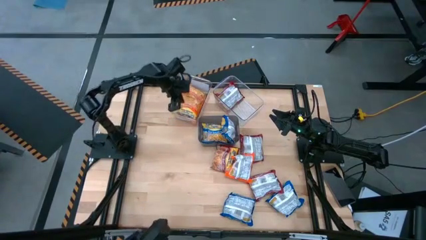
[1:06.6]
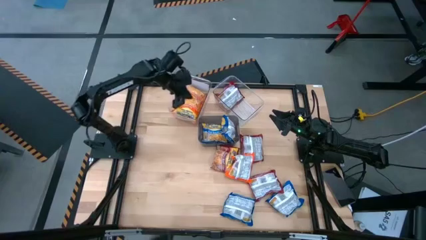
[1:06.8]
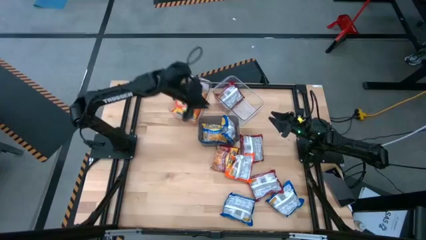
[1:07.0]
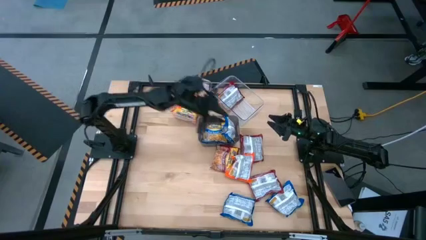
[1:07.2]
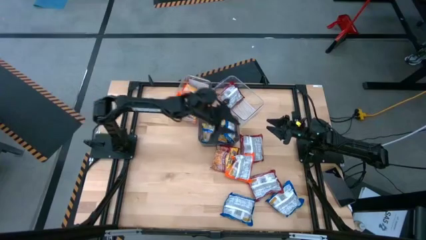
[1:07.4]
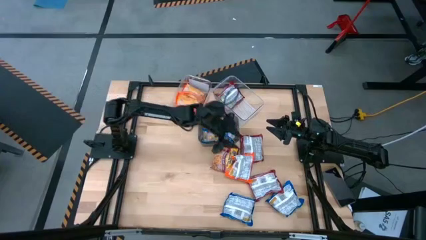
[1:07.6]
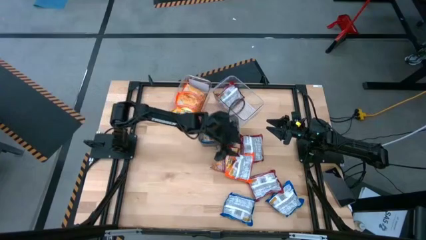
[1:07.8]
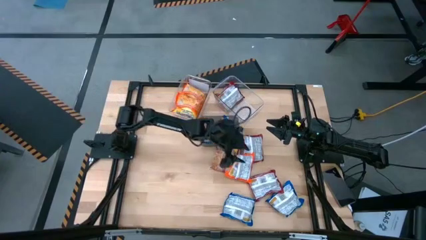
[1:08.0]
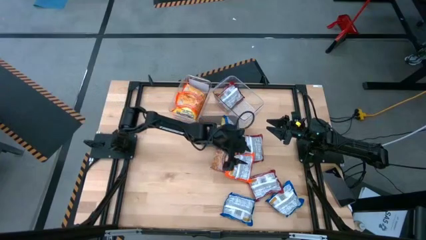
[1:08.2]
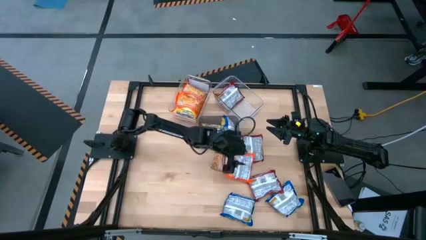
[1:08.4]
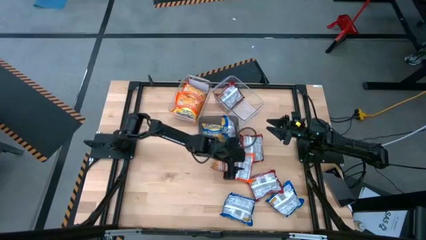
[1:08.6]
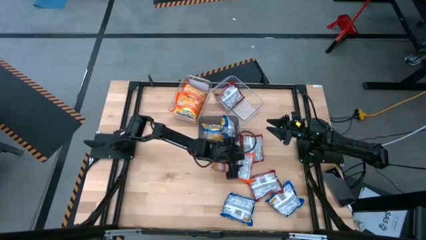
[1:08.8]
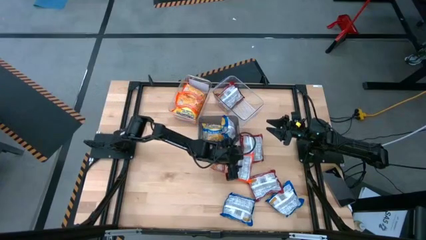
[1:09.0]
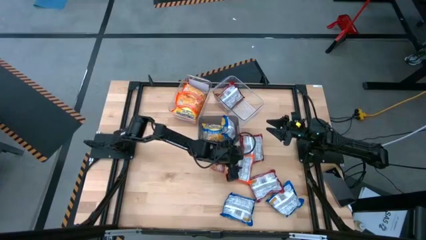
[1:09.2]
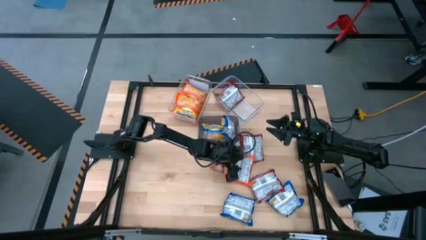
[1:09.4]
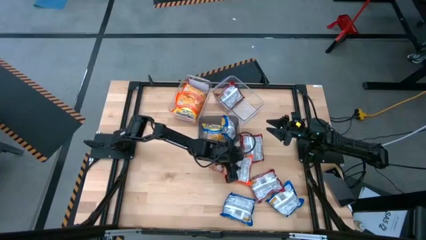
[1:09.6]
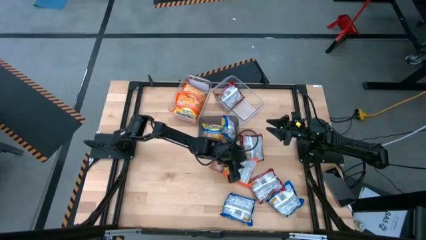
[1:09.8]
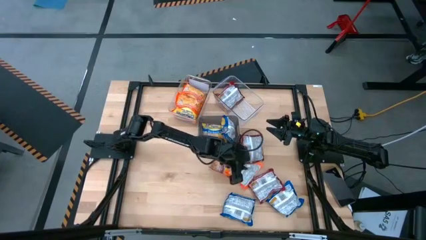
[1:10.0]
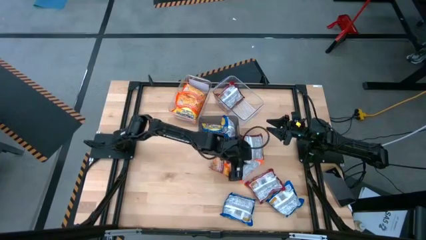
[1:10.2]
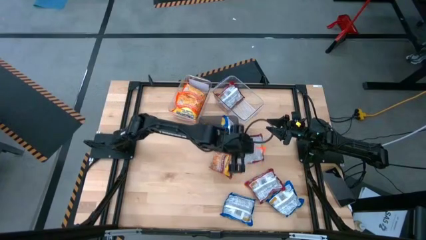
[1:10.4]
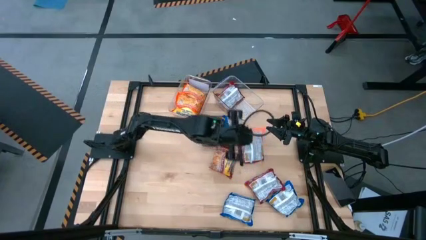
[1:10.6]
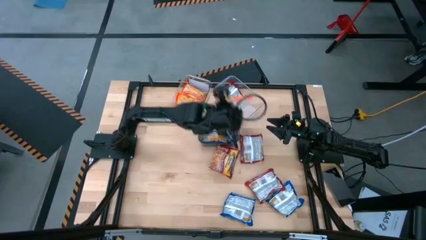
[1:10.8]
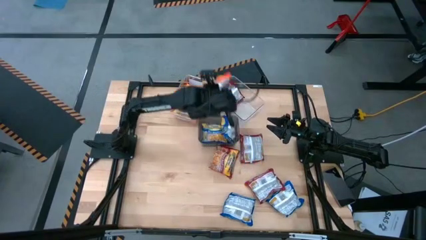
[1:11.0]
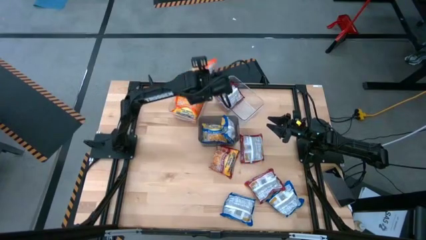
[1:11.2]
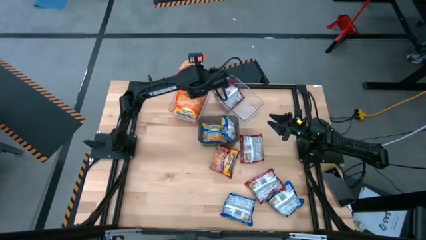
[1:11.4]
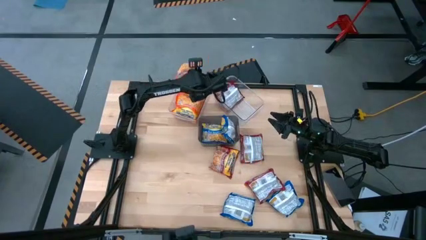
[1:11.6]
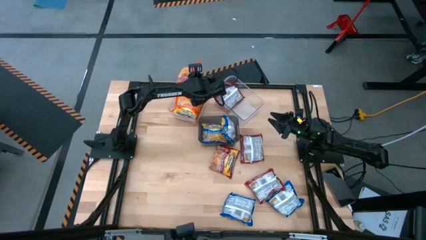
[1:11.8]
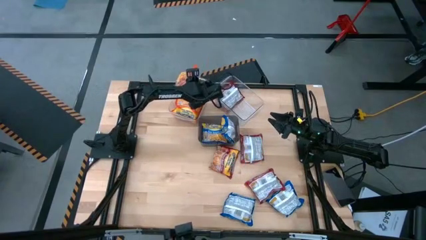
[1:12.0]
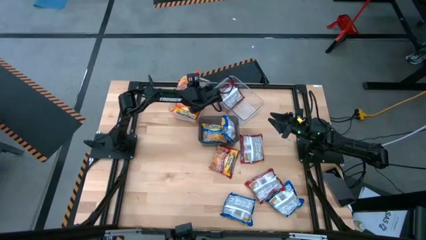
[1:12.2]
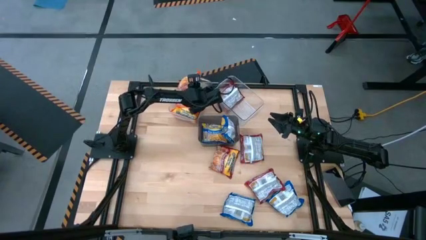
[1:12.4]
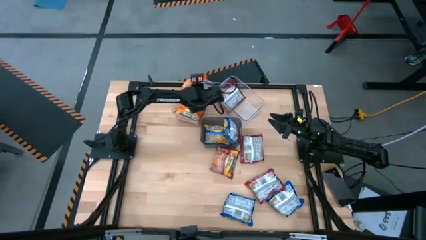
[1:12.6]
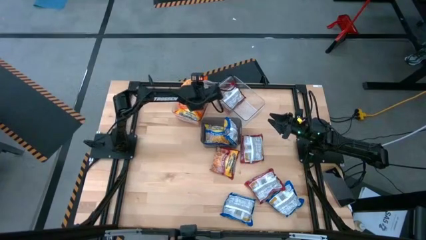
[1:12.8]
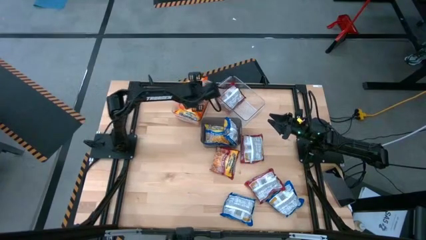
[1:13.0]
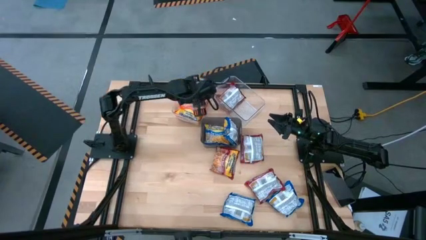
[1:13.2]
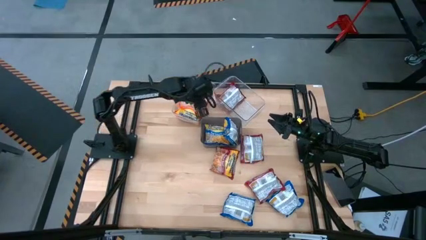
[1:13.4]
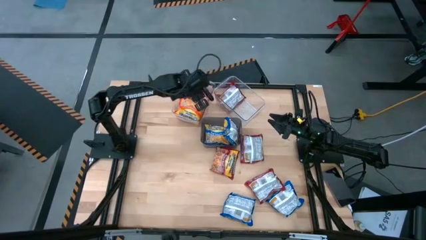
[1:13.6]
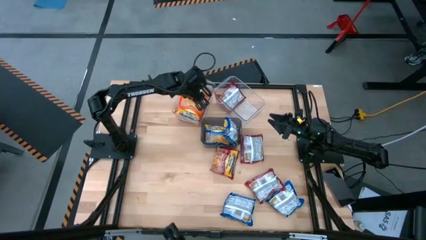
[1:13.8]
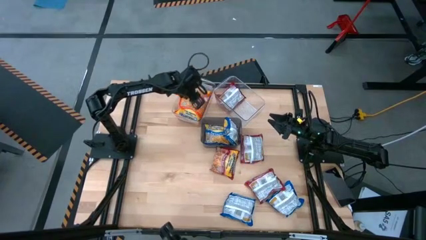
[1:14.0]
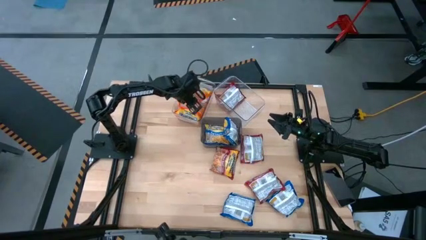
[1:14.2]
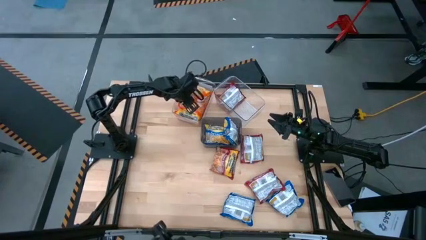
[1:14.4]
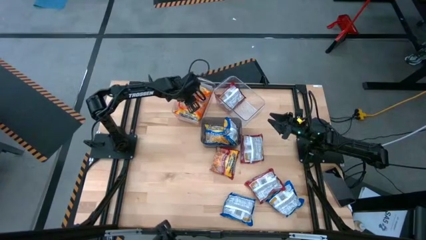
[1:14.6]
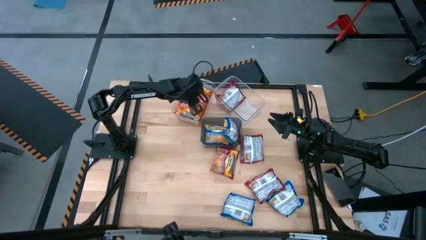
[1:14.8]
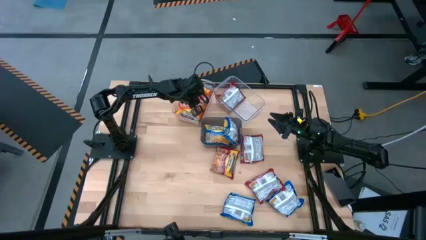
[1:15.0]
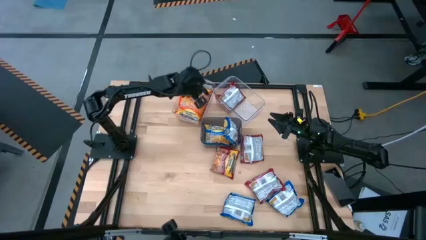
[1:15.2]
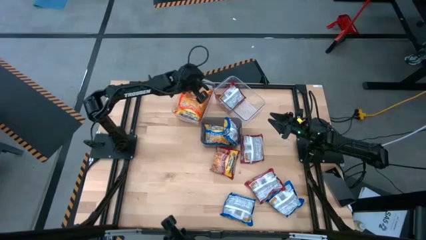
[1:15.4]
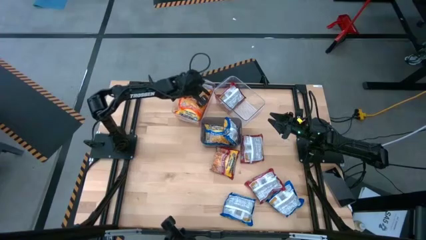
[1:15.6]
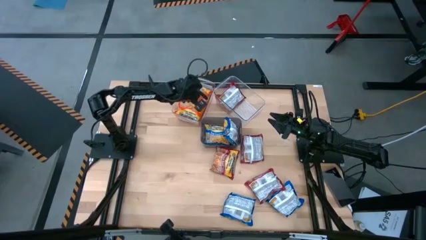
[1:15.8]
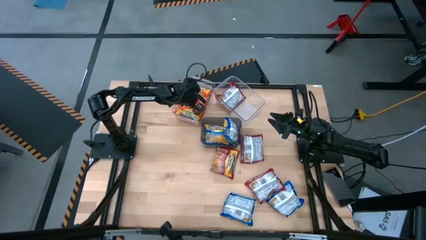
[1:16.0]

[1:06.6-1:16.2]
Task: Sort Maruchan noodles
Put the orange noodle pack into the left transparent bin

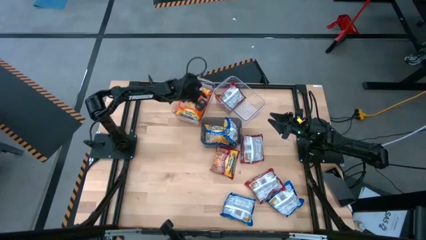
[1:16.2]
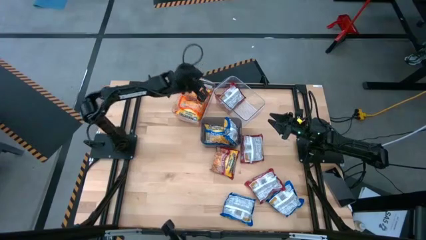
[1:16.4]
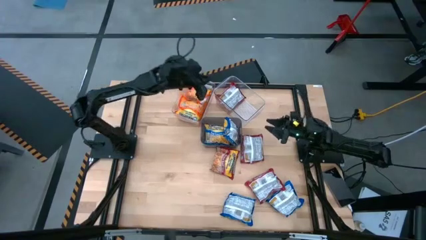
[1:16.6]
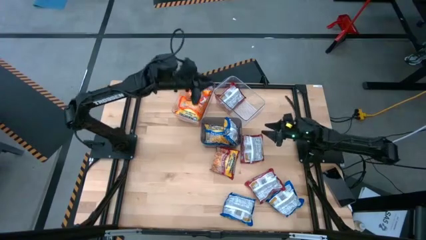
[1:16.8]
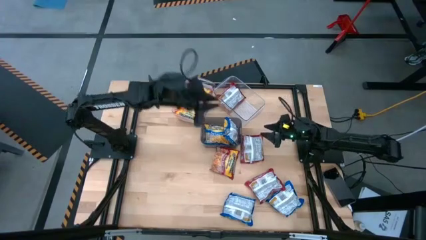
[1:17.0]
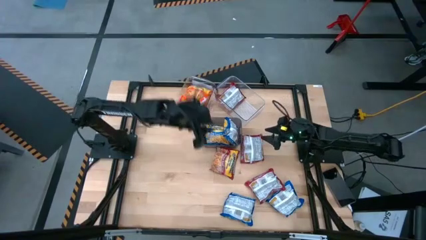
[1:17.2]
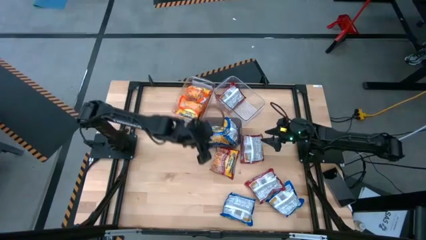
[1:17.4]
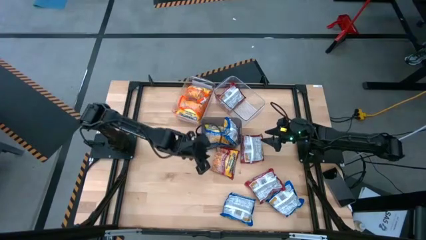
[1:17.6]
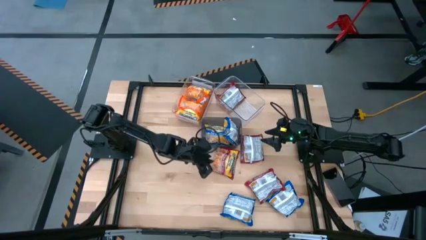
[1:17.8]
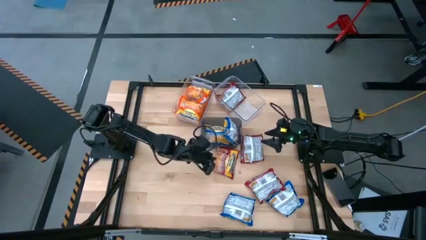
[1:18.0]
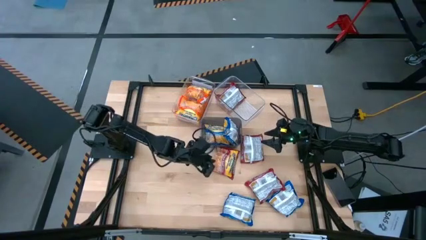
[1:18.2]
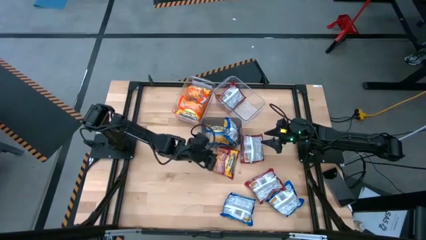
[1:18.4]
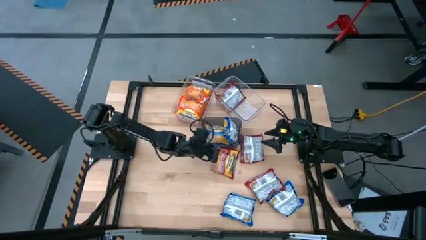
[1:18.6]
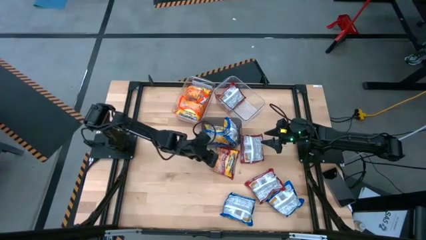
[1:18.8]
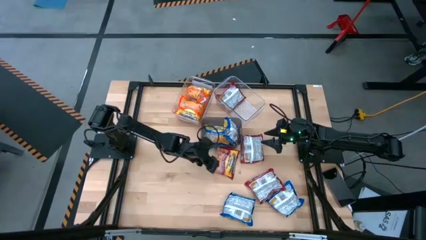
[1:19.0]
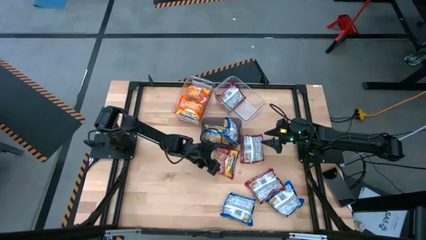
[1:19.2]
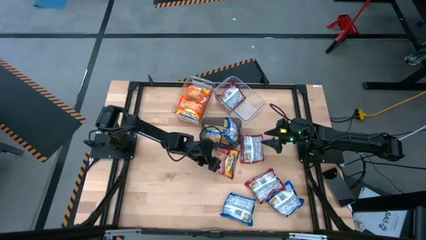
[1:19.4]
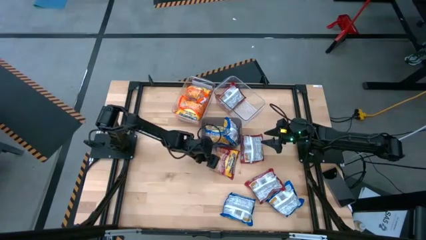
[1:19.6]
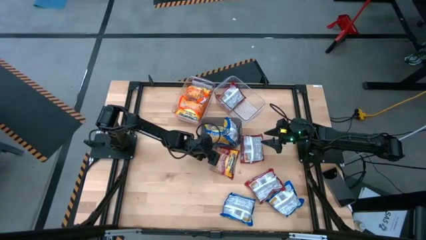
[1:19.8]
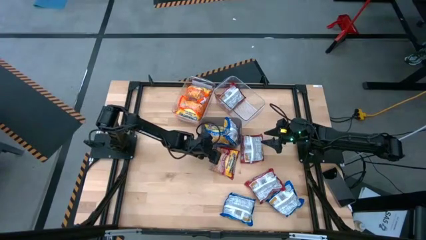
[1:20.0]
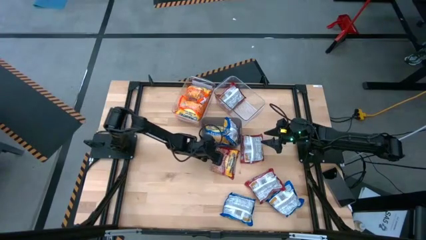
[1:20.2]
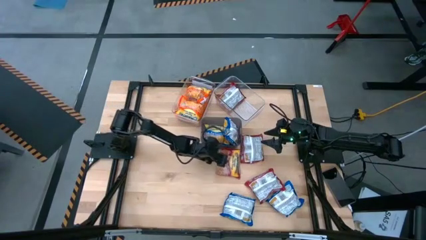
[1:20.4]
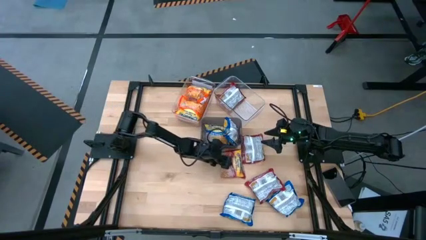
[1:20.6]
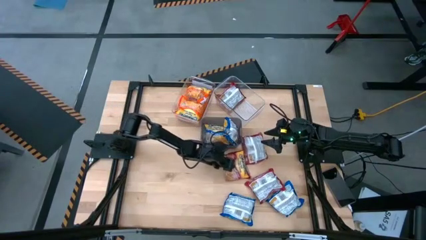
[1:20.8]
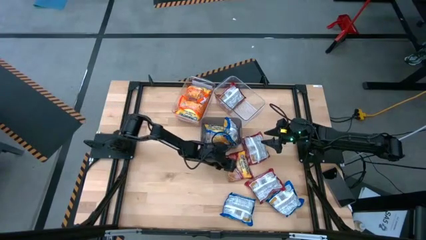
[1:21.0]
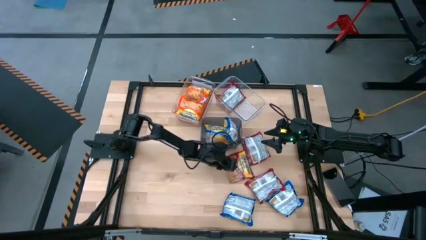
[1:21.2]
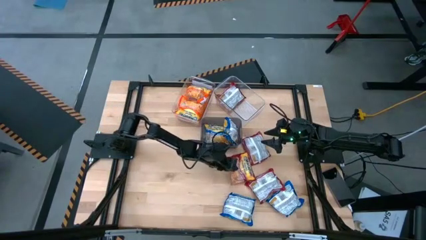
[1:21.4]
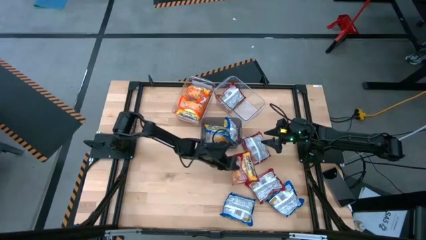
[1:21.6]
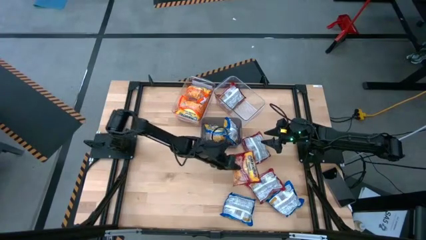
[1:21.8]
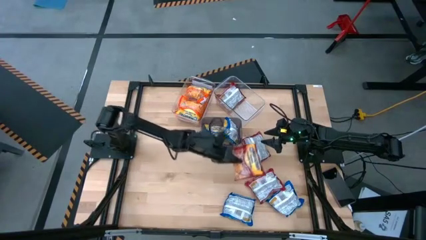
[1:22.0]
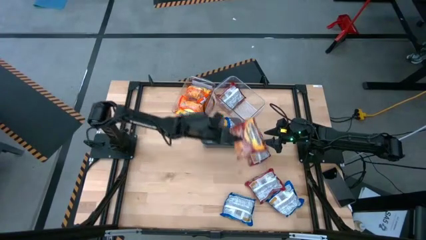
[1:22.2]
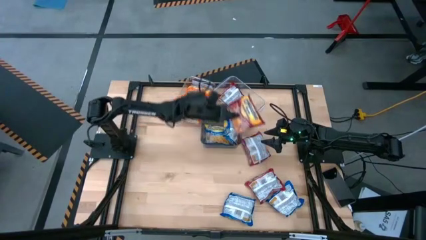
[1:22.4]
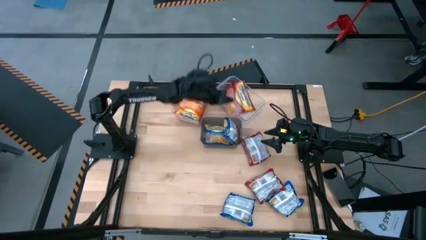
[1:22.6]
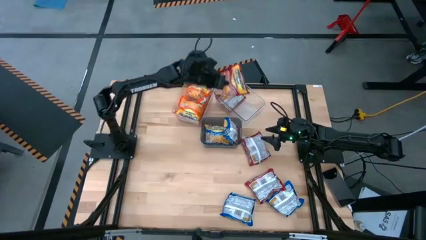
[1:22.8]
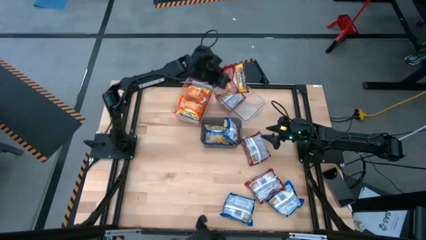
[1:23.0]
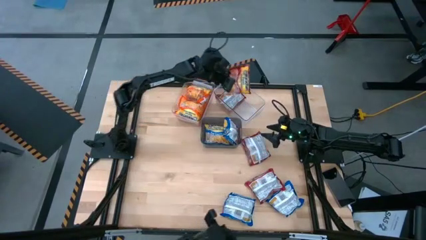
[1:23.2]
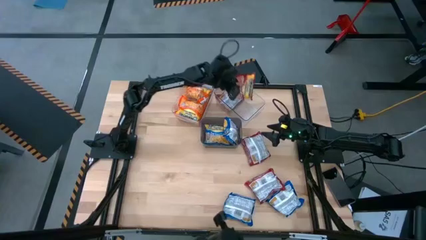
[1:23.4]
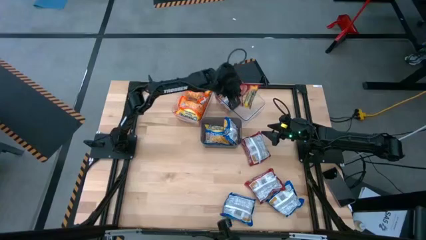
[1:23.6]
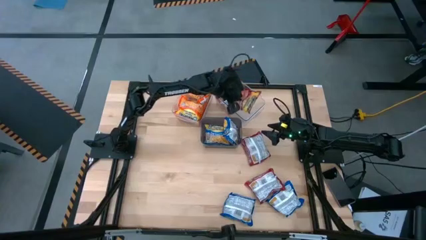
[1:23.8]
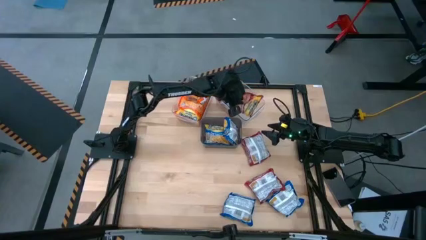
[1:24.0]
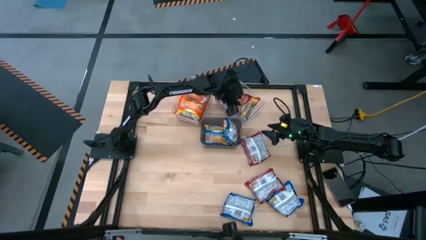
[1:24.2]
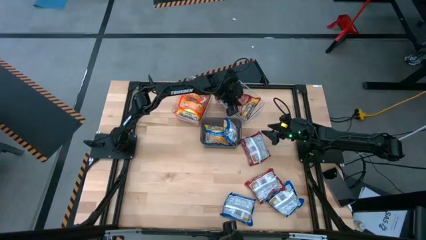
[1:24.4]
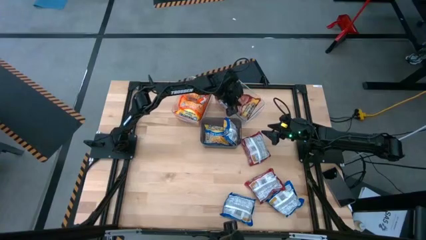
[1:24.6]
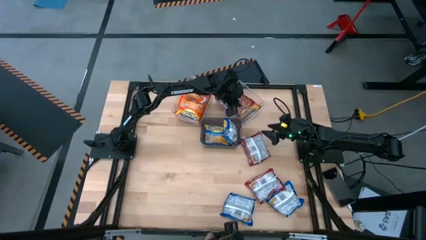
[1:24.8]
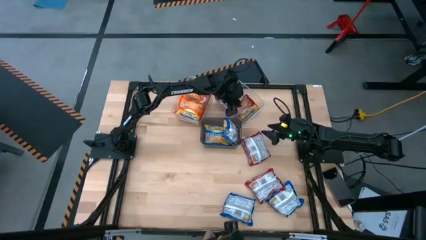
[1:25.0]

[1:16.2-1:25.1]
Put the red noodle pack into the right transparent bin
